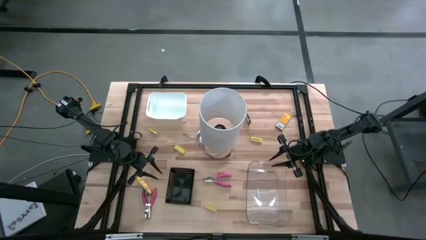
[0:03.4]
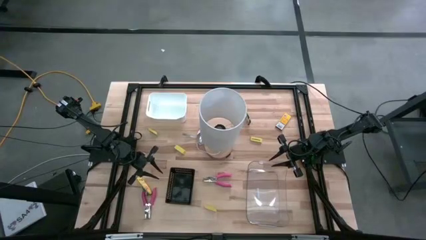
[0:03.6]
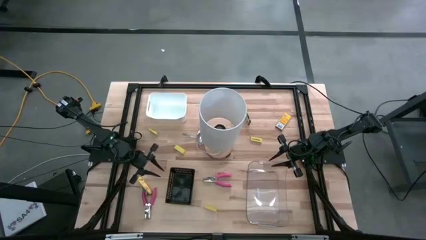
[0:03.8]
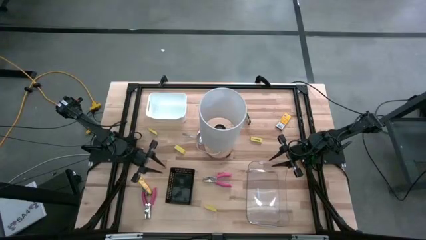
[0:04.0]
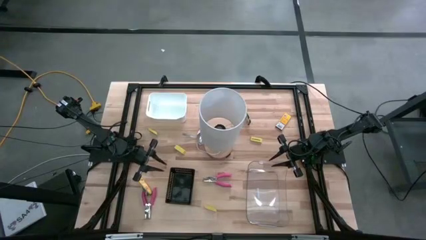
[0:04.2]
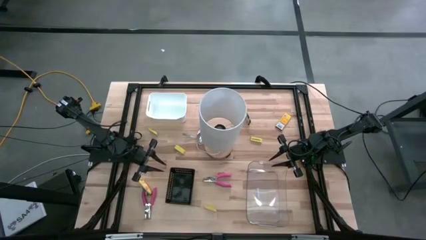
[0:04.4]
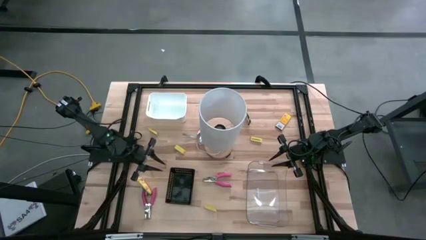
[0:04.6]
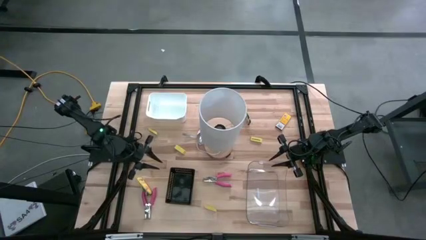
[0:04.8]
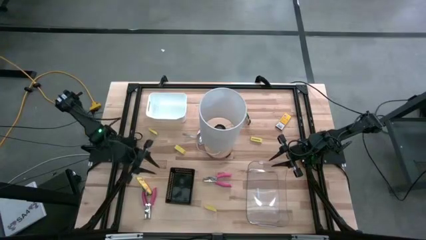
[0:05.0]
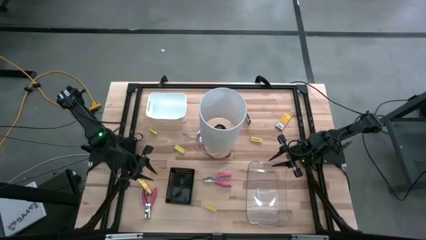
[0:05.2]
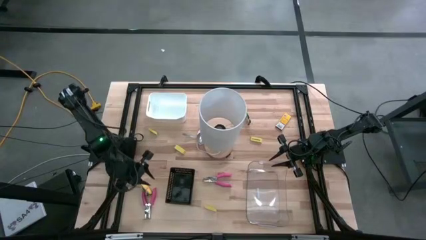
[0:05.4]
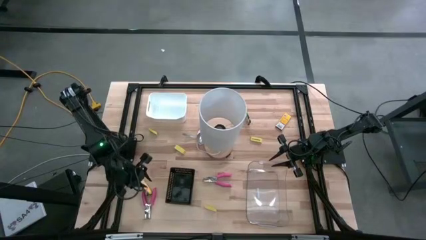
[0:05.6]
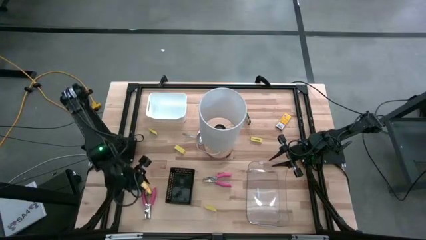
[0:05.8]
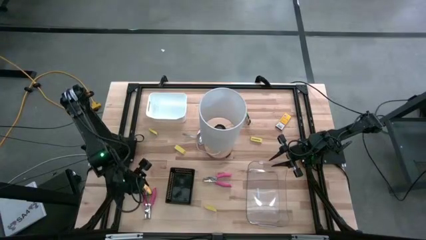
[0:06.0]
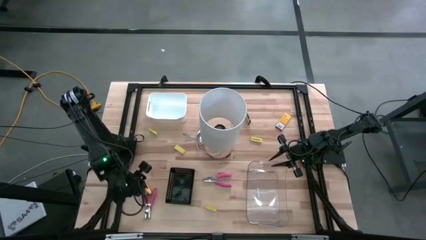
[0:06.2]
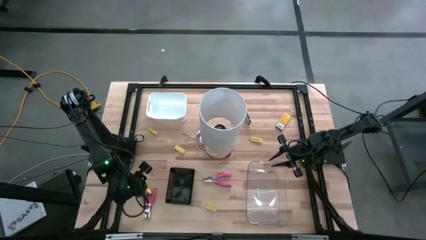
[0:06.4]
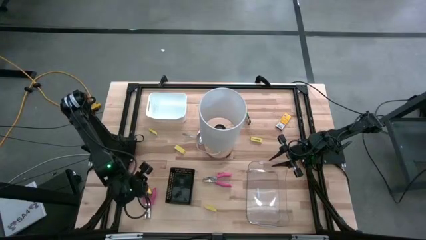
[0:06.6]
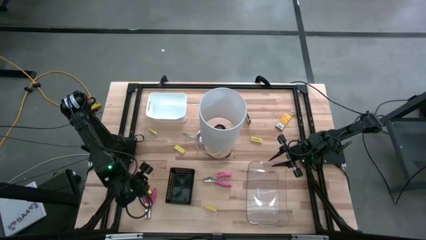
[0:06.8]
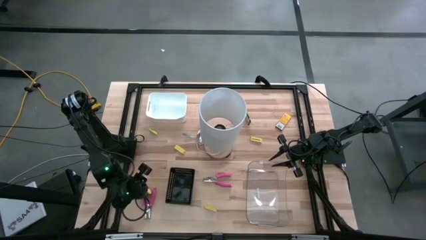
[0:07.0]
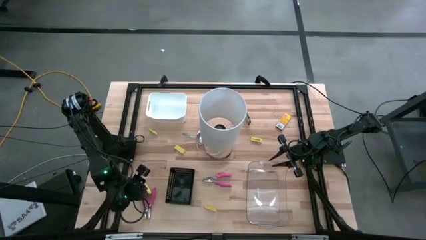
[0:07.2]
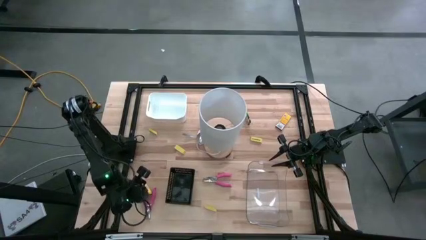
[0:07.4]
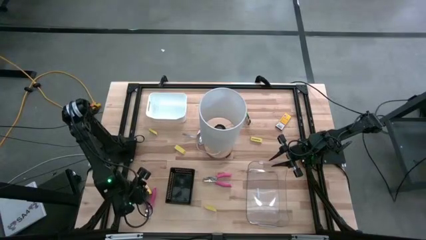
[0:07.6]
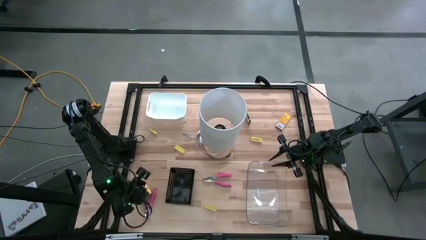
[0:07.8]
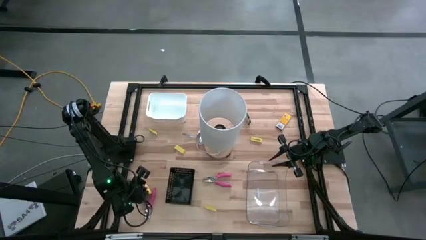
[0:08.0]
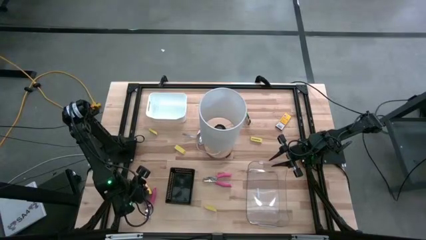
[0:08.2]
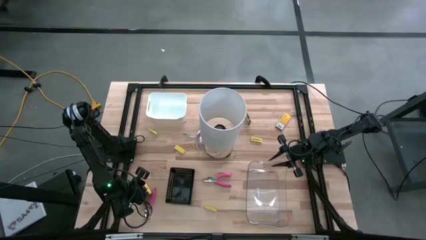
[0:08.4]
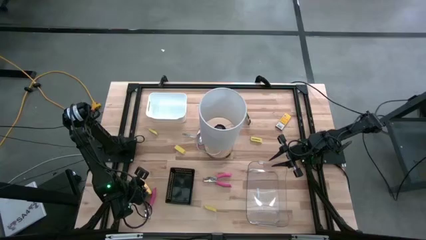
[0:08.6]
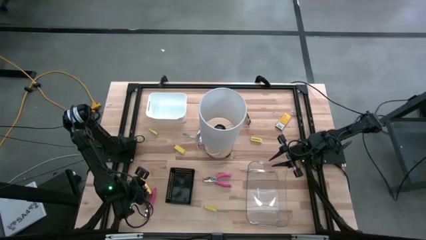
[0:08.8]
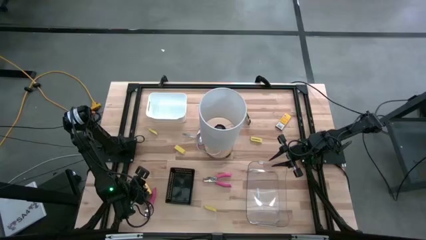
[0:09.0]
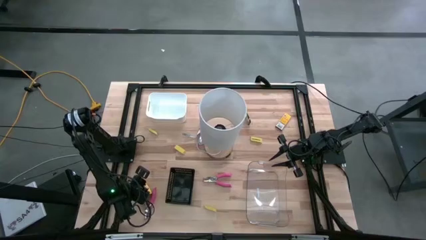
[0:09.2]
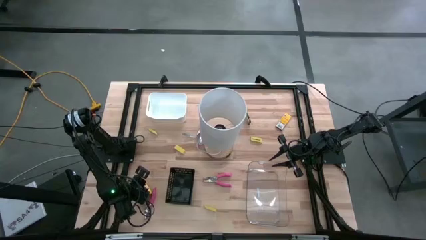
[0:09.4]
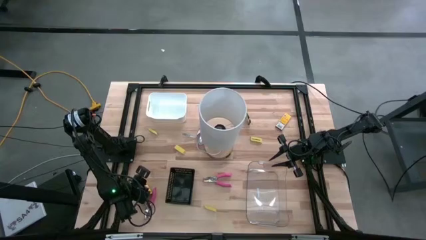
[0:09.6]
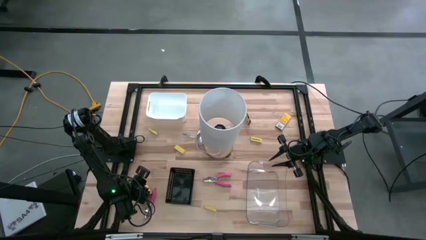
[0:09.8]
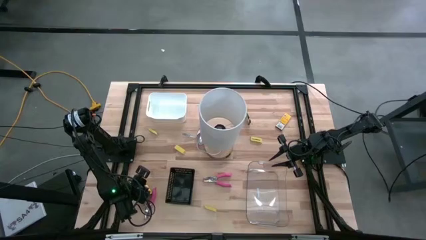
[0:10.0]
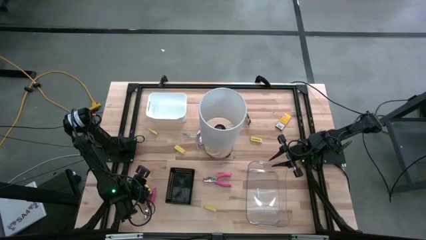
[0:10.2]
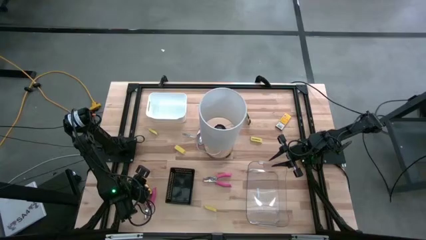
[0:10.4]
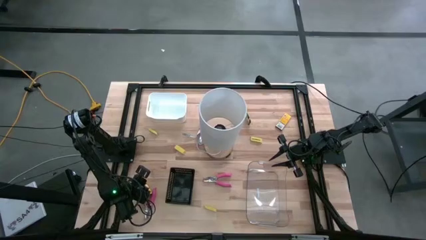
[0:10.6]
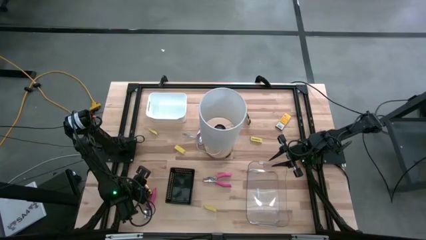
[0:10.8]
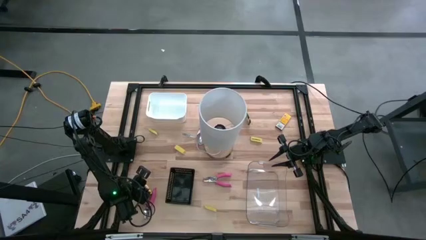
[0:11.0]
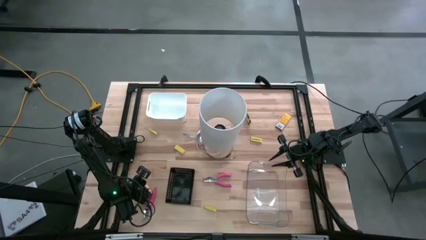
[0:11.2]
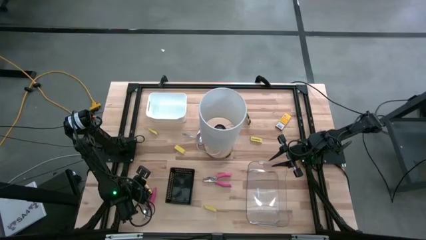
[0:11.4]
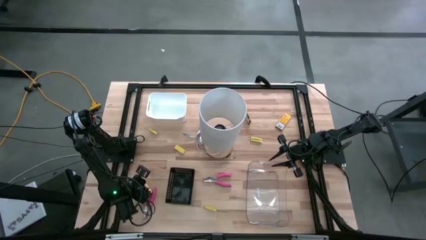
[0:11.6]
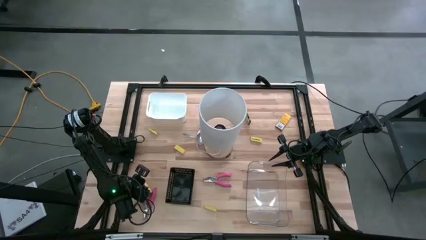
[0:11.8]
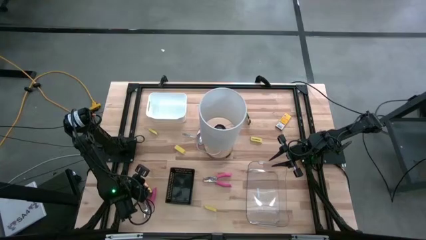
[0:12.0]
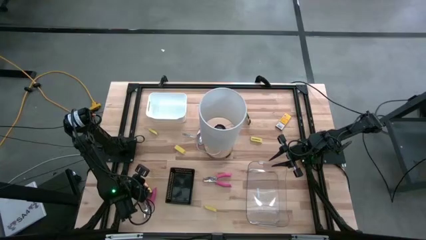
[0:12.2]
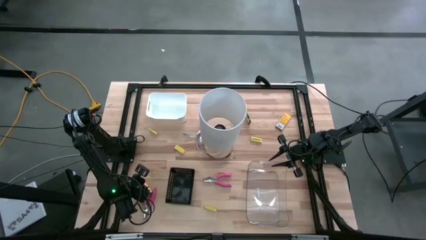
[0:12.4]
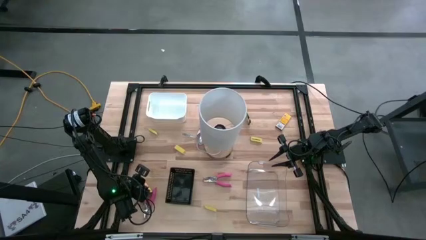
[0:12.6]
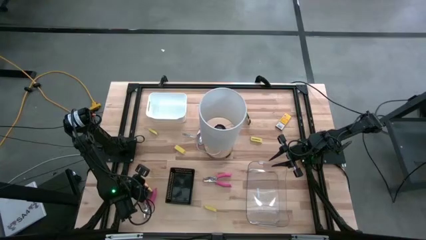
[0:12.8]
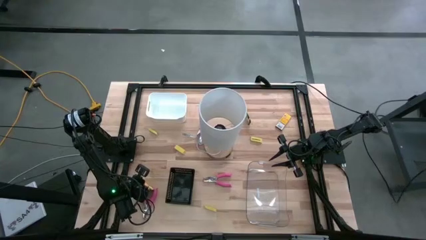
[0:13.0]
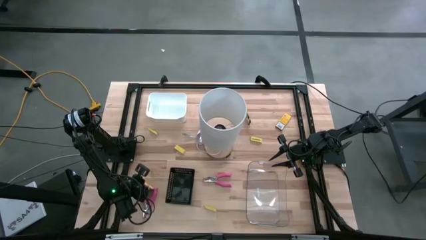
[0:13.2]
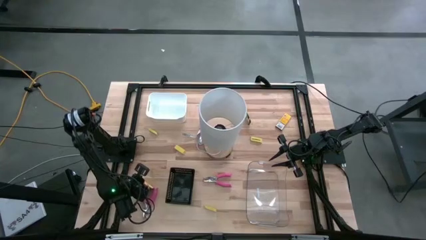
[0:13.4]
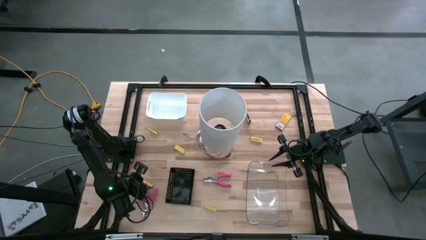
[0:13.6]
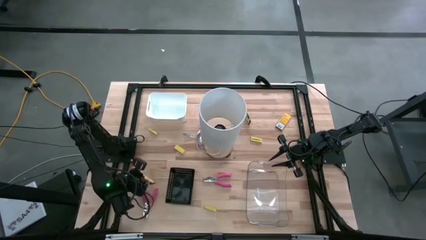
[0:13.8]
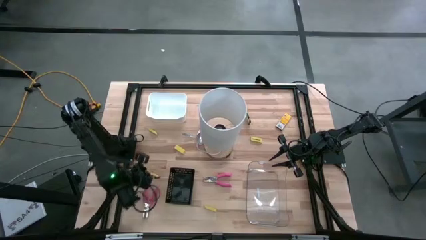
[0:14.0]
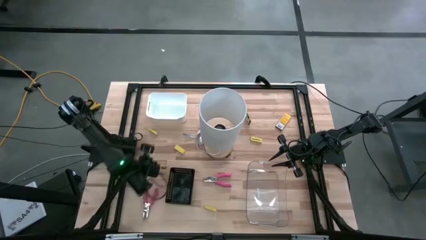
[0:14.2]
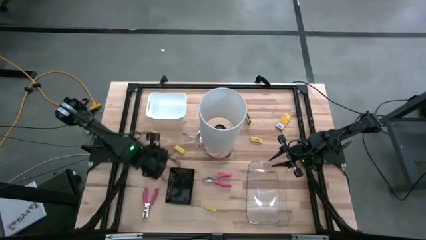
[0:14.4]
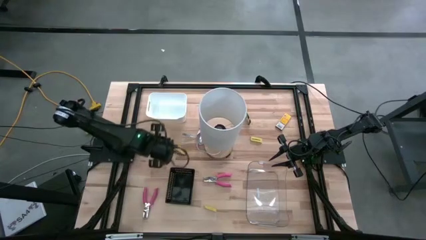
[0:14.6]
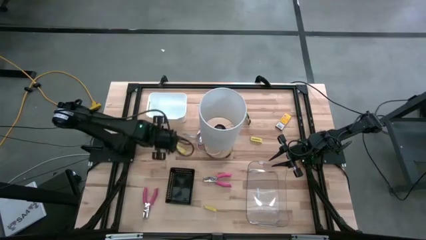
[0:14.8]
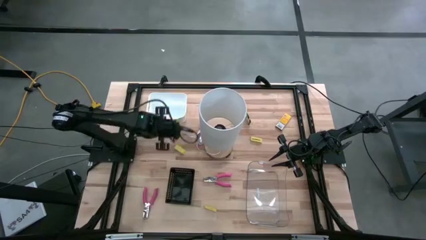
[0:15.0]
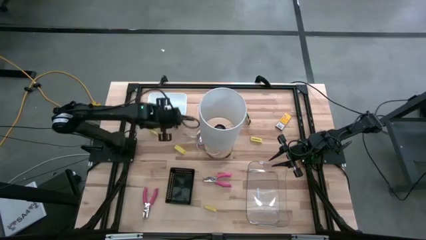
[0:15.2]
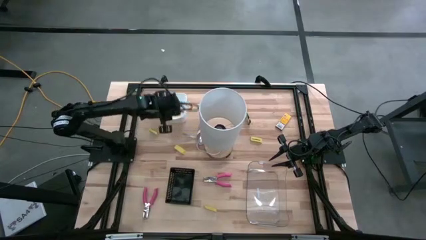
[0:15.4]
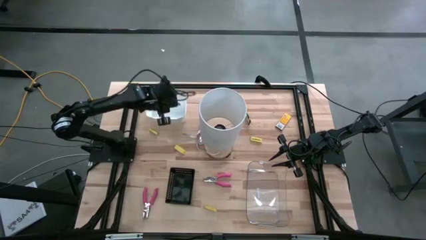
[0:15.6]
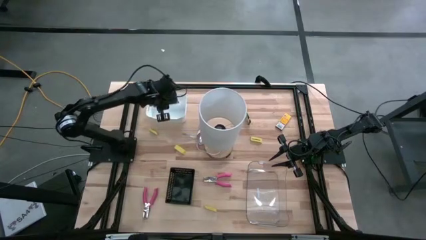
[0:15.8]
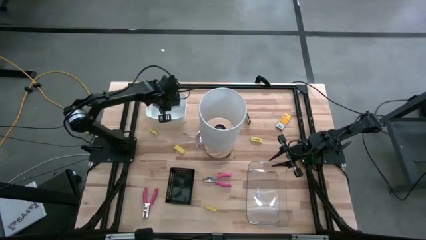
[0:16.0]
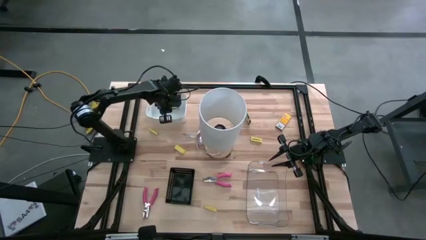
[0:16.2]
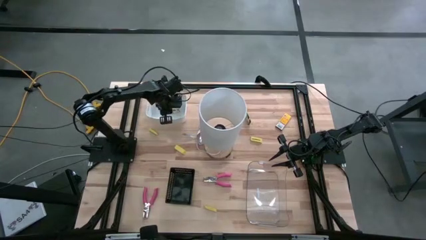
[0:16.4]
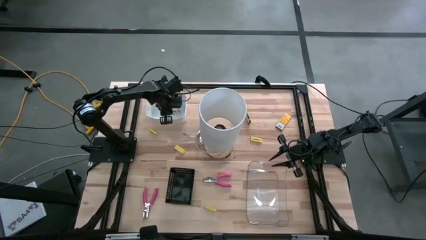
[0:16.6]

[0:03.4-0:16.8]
Task: Pick & Place School Supplies
Put the crayon box into the white bin

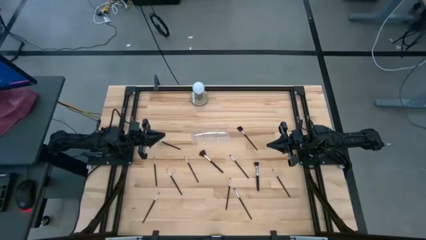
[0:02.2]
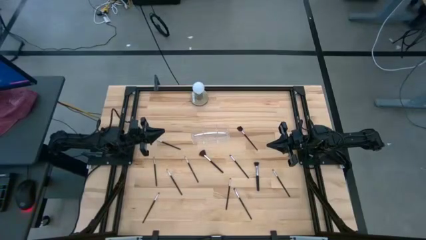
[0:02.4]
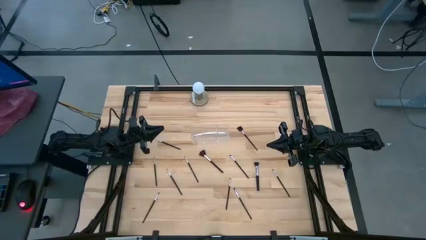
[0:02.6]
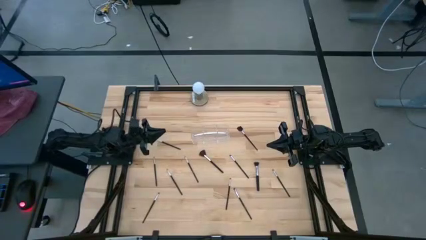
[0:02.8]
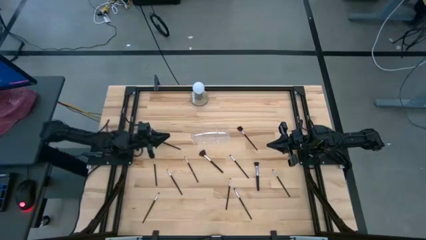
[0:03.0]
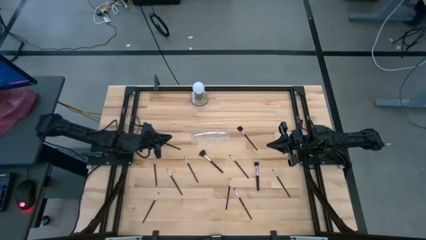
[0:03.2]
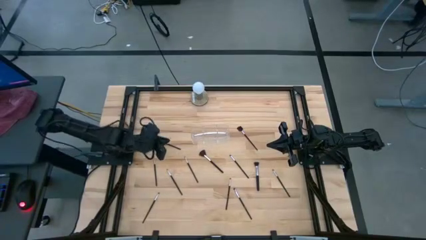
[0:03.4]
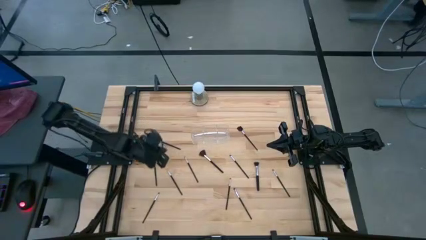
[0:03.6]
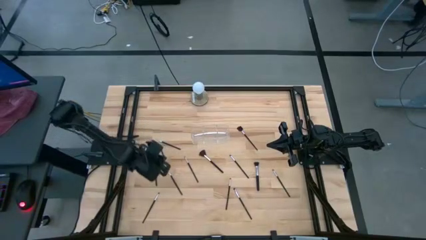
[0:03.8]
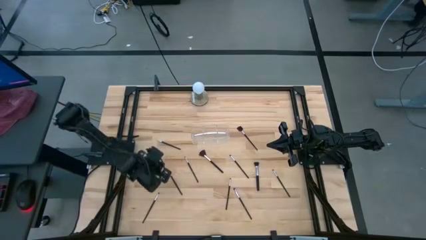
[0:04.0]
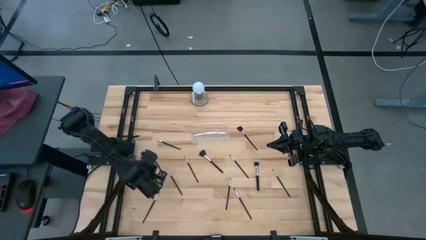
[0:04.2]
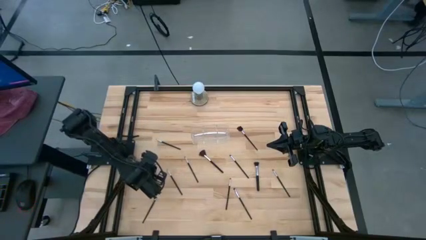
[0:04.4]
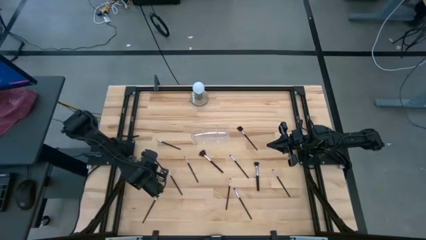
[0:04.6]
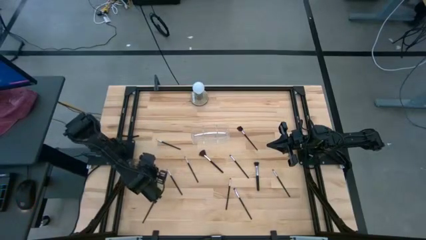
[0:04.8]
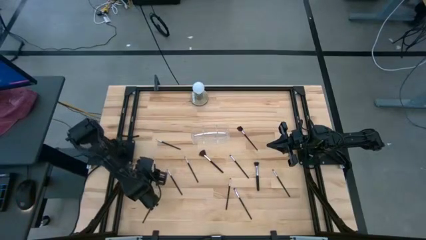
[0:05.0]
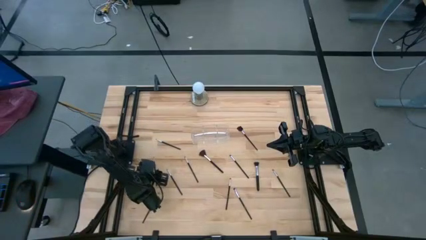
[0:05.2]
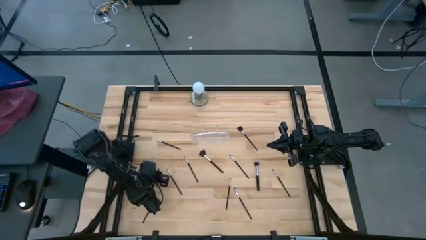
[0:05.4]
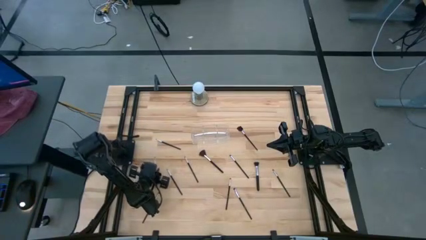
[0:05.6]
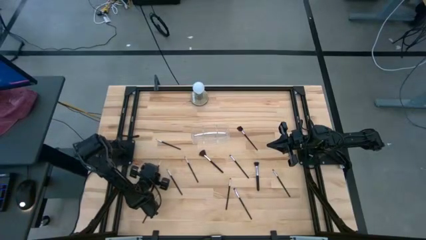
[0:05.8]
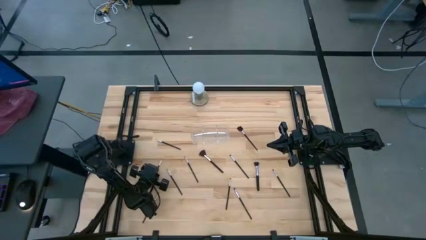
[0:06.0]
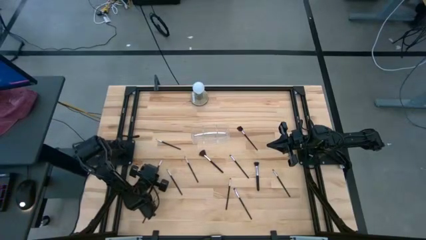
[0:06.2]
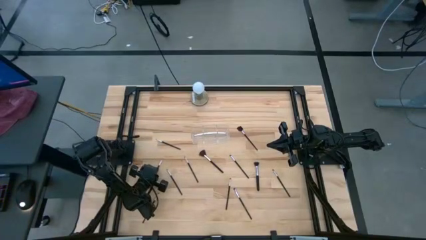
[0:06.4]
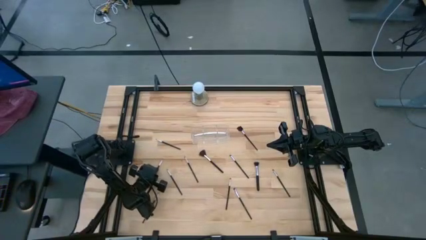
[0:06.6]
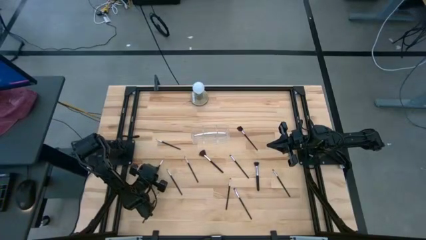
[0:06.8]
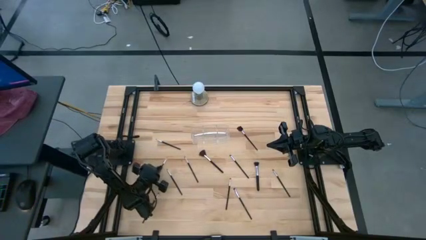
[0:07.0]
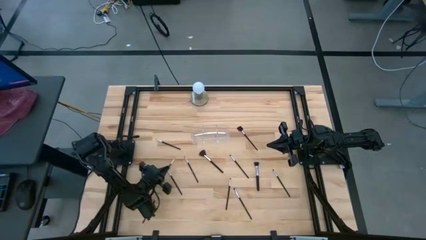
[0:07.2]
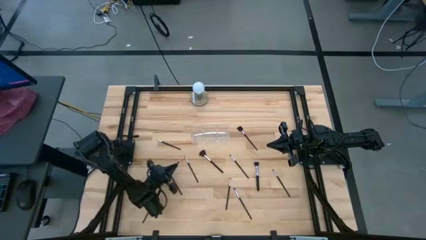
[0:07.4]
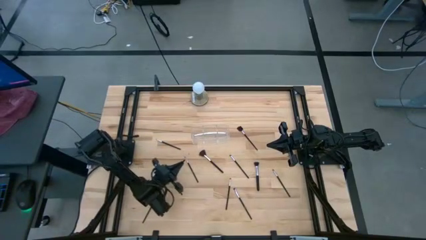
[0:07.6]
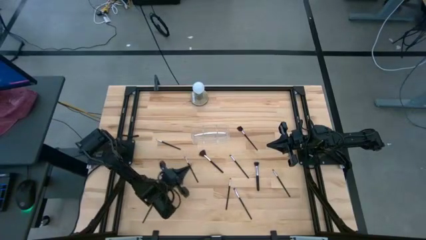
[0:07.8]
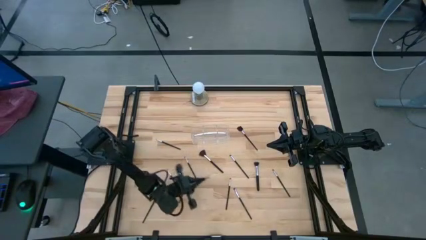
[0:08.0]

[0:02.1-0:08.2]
Task: Put items in baskets/containers
Put the bottom liner brush into the transparent organizer
